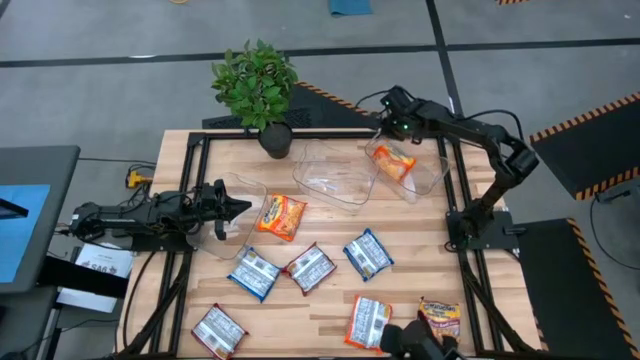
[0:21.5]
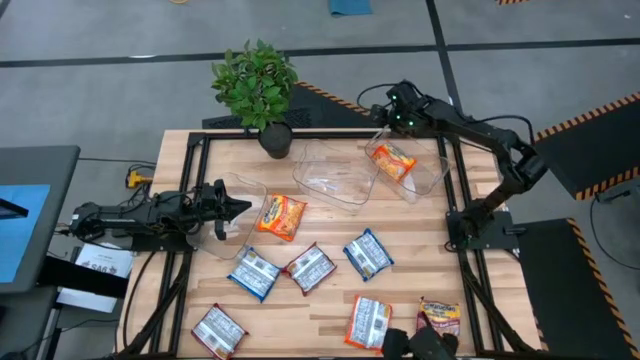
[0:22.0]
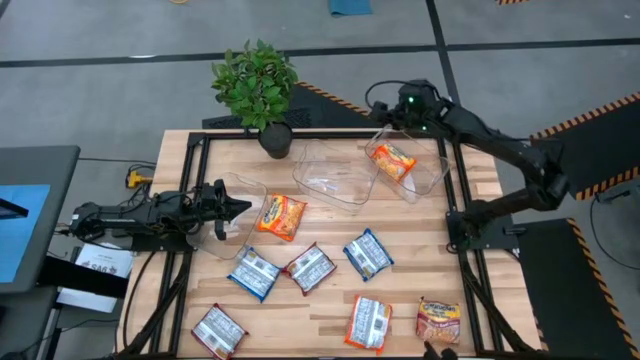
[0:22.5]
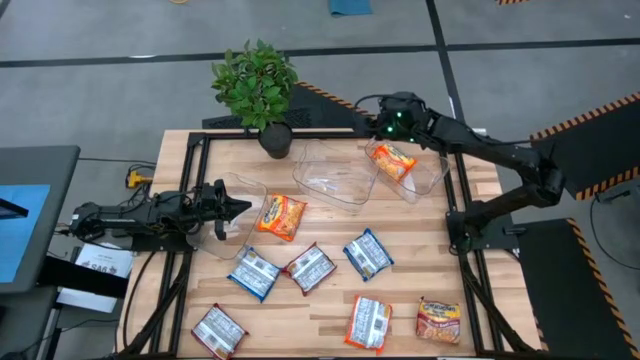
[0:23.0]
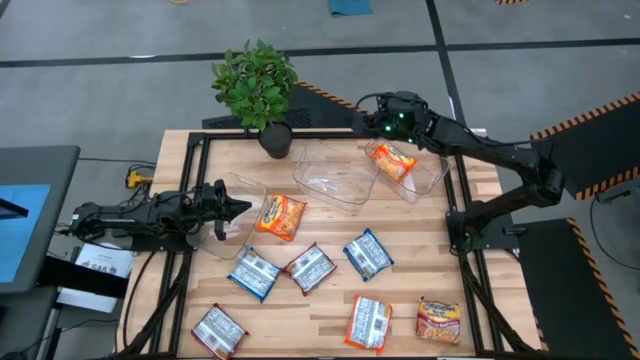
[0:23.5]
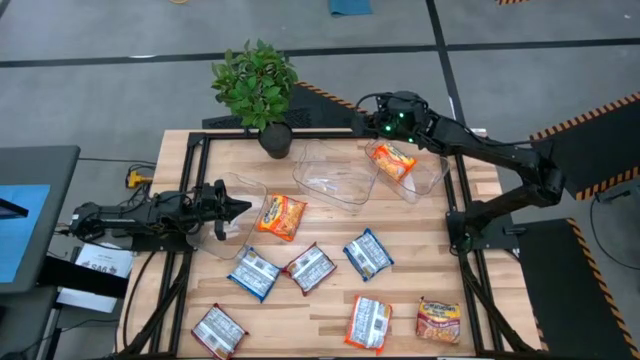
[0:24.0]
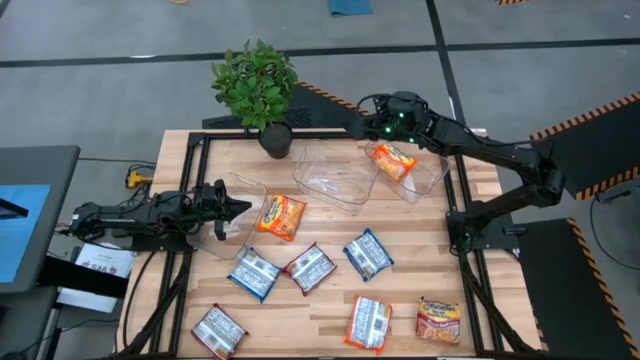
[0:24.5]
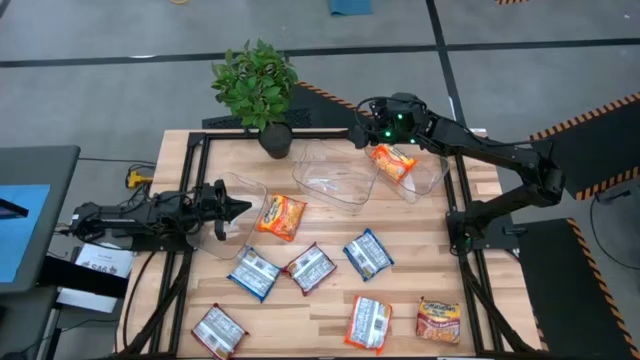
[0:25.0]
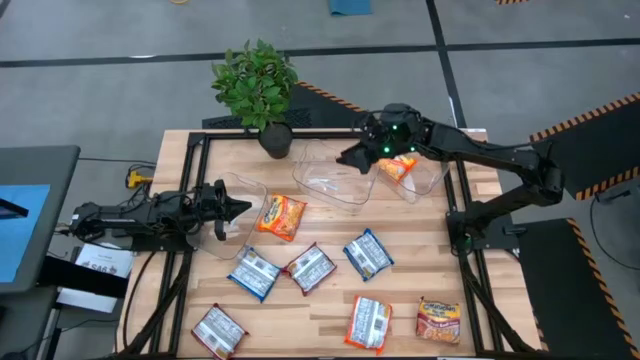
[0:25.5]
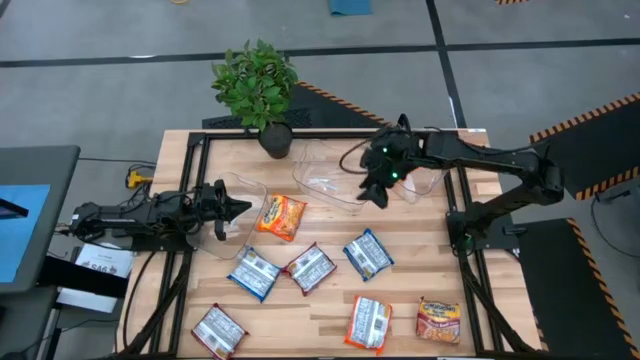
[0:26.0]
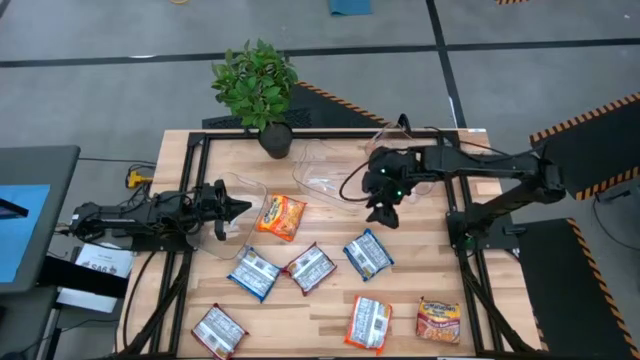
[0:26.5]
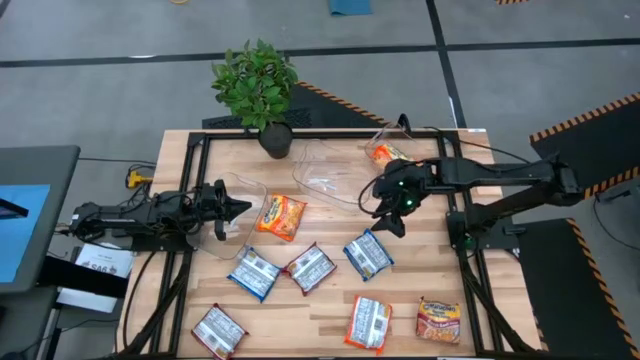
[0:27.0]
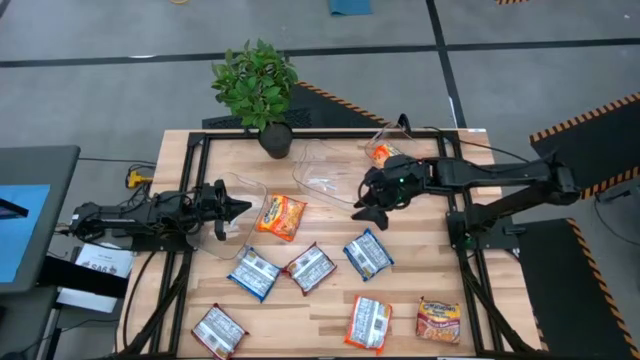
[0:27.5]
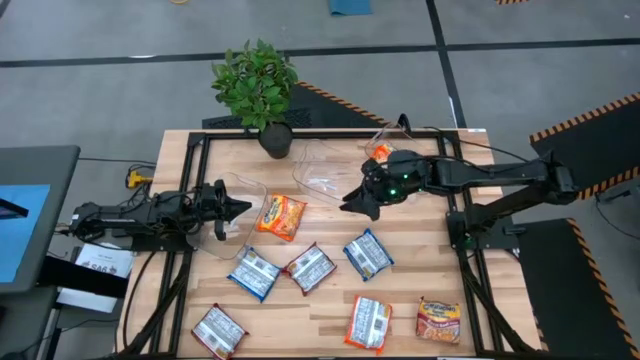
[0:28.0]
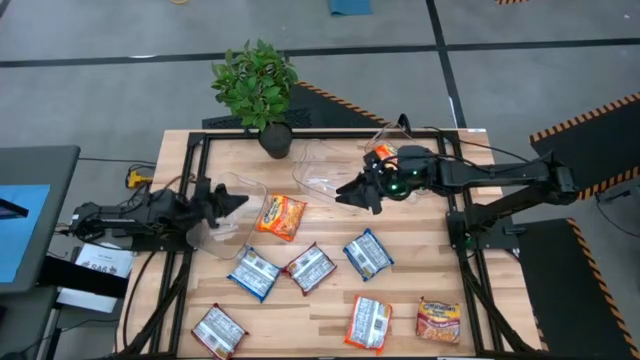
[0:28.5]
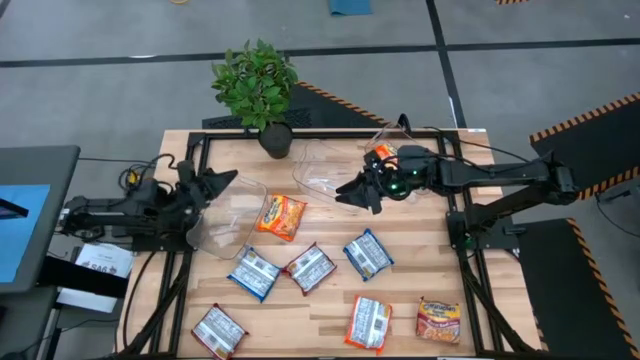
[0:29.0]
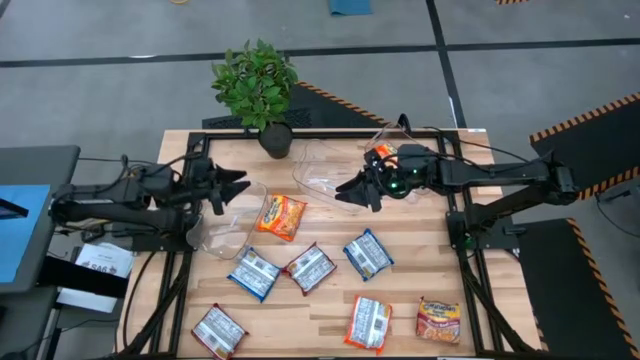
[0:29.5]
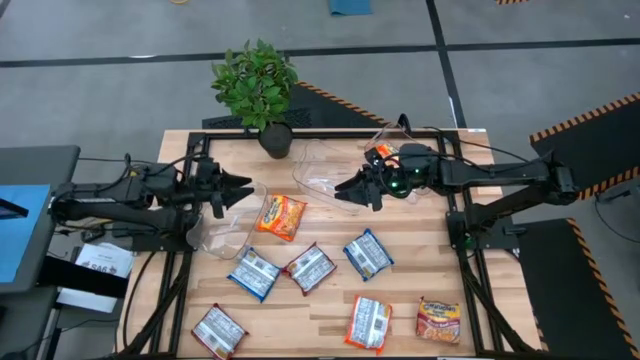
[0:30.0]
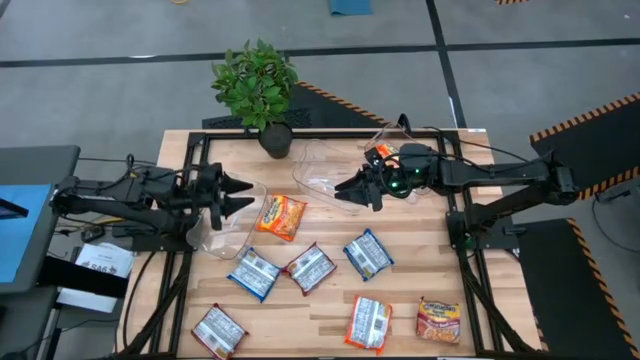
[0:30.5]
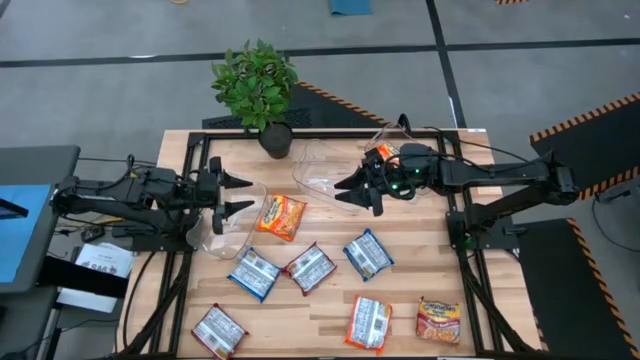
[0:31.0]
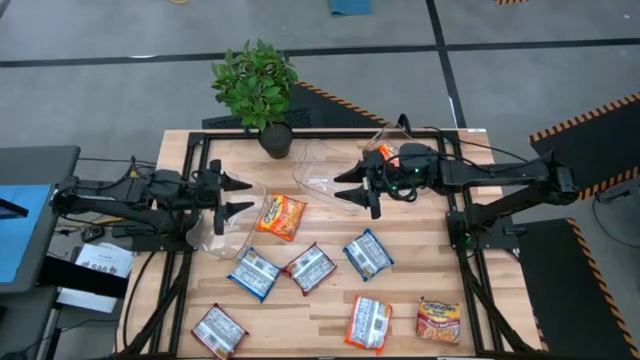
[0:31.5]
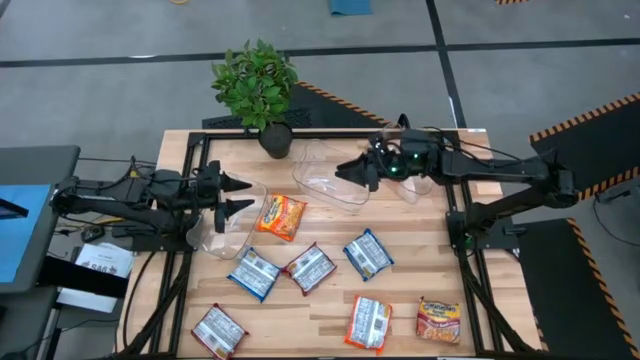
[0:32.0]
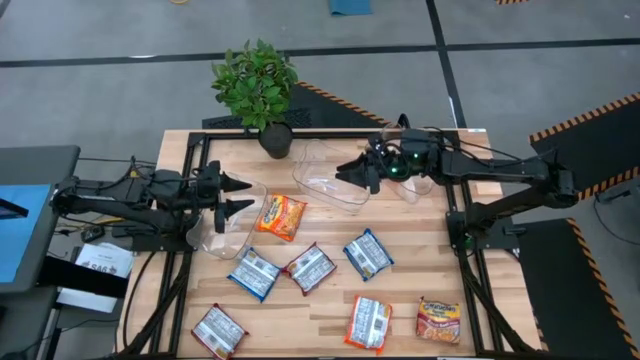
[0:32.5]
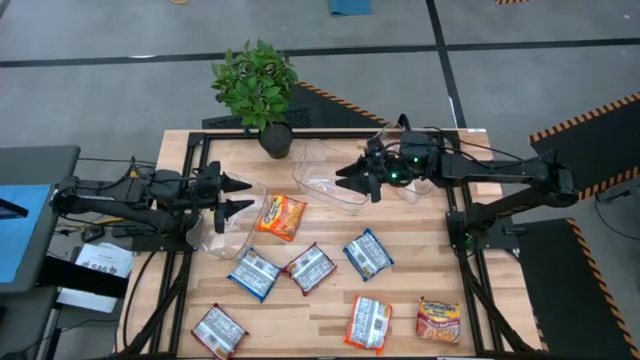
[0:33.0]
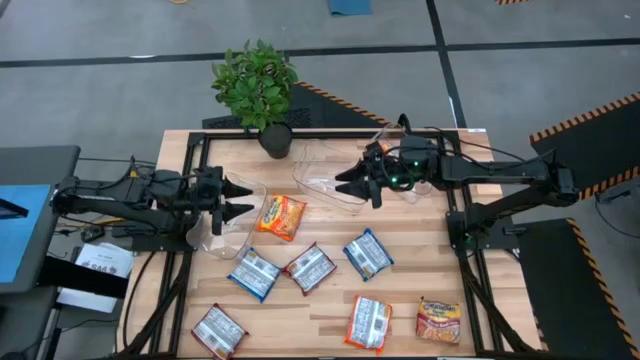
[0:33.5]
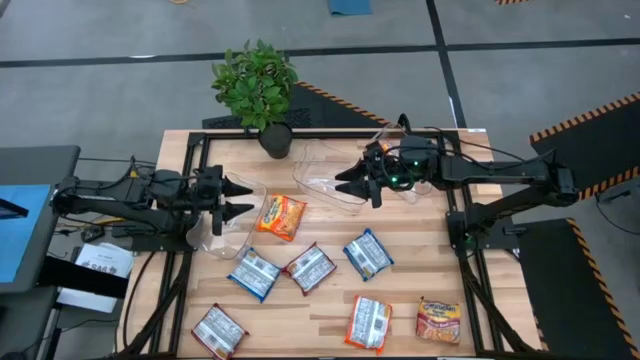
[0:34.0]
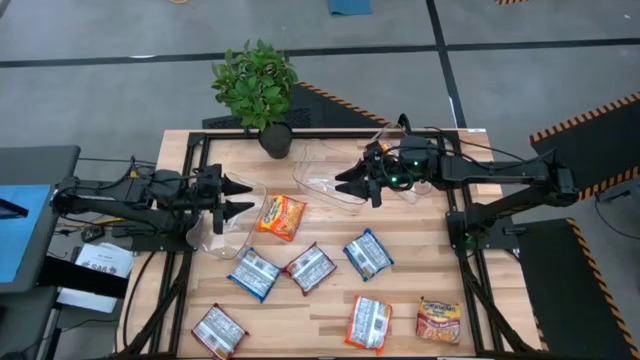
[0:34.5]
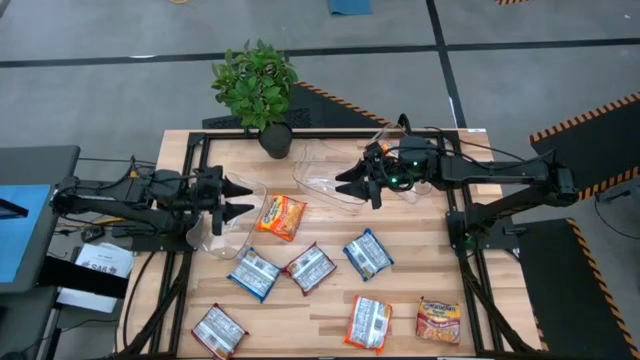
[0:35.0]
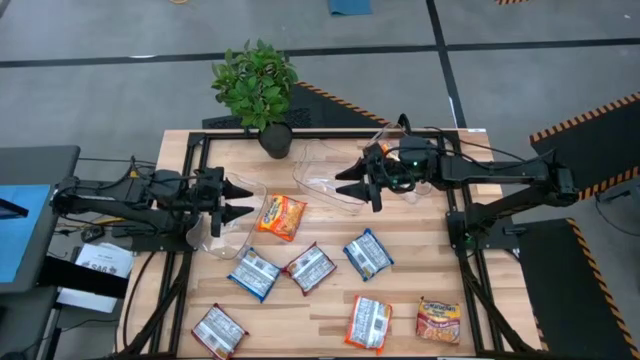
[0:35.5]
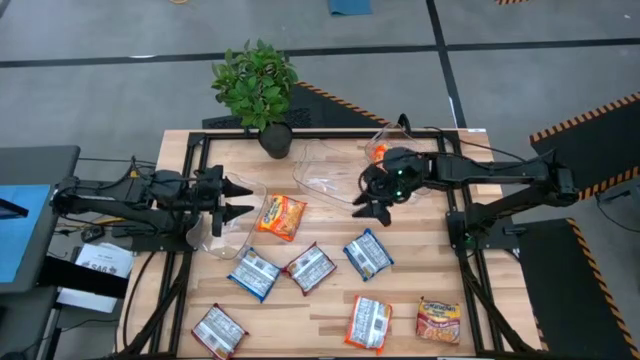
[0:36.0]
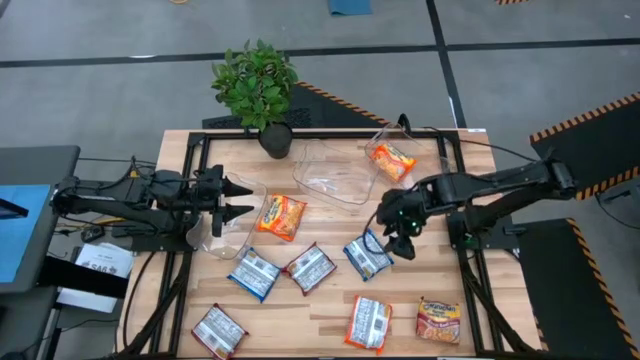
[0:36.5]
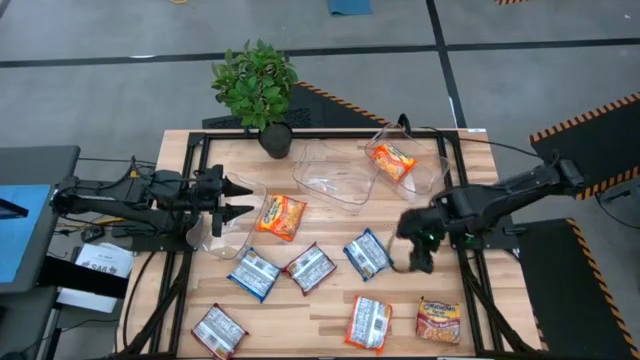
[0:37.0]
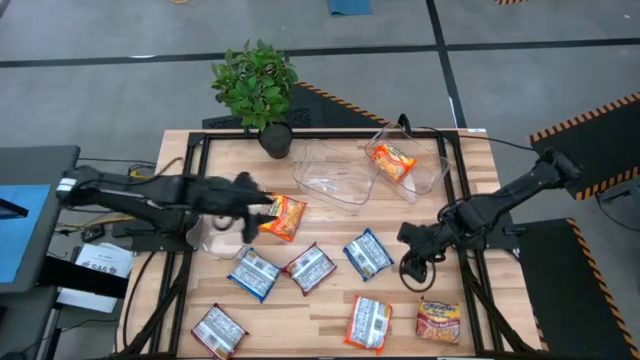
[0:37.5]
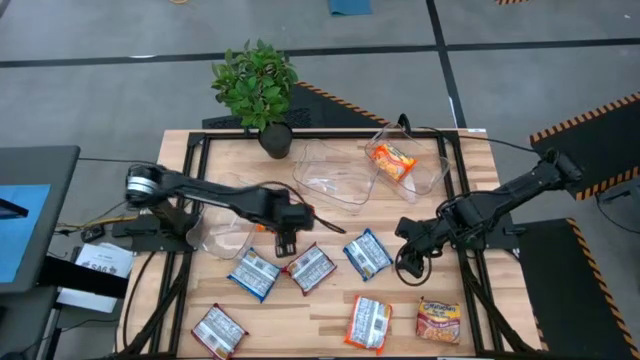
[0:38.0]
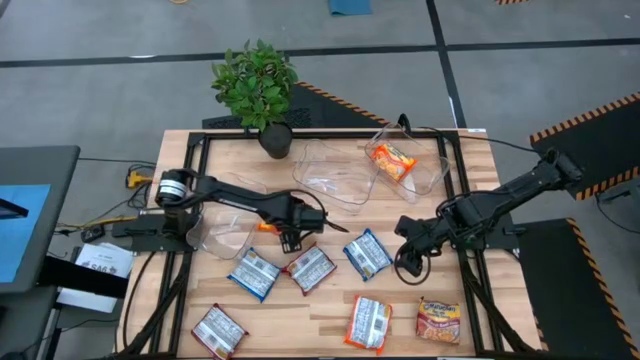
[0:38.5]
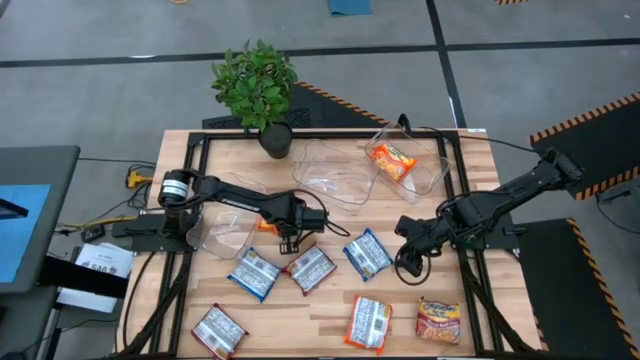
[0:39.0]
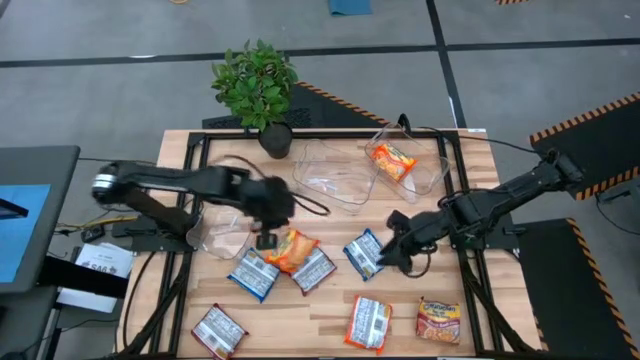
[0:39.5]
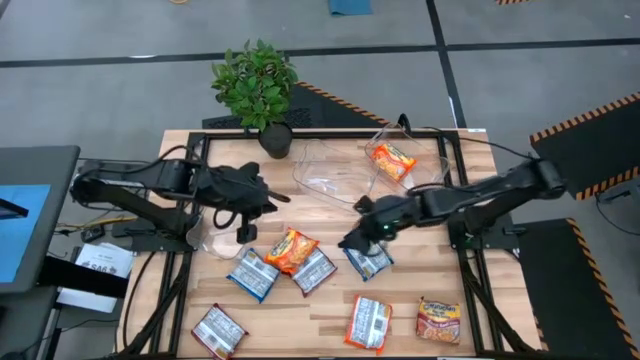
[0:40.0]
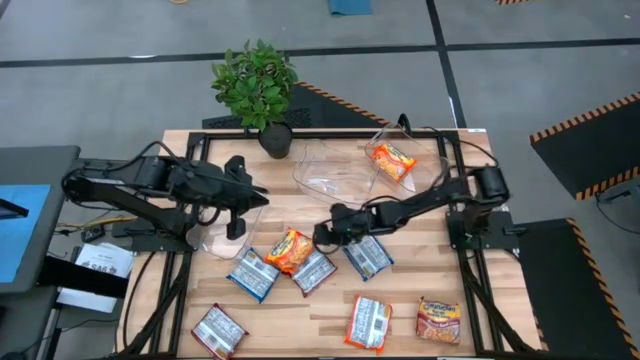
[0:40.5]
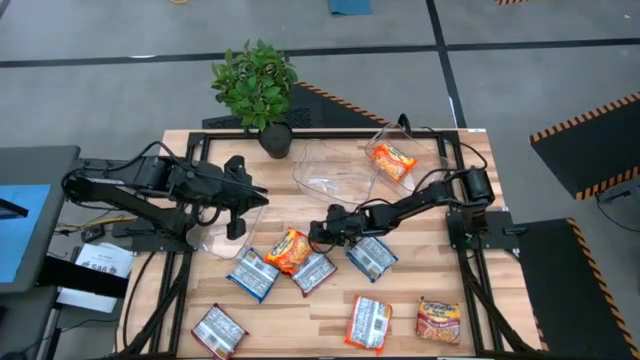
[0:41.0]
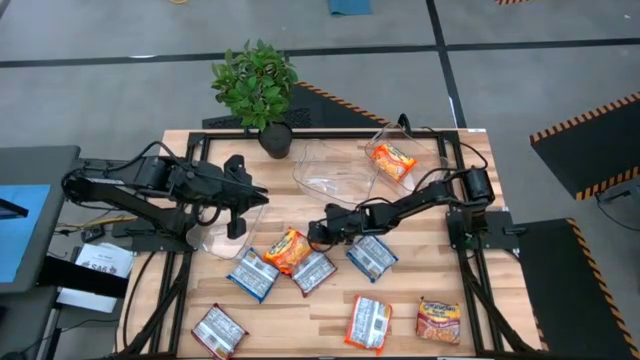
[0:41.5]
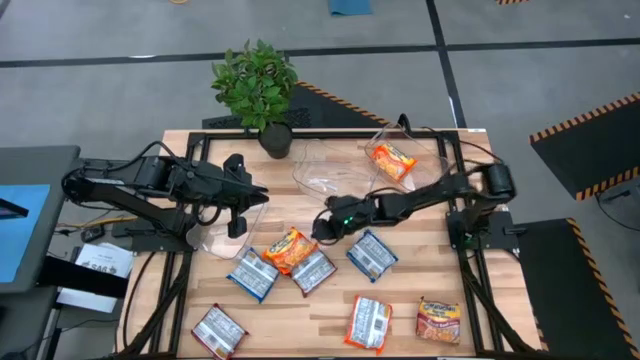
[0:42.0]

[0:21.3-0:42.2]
Task: Sort Maruchan noodles
Put the top orange noodle pack into the right transparent bin
